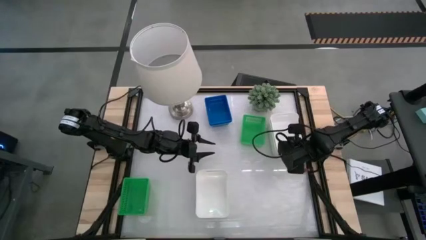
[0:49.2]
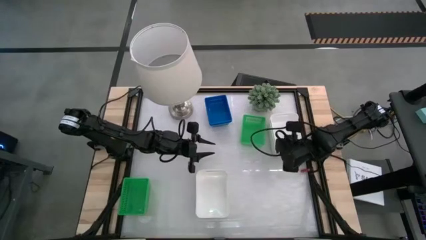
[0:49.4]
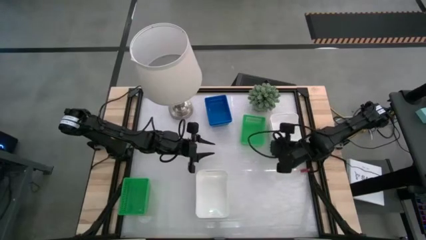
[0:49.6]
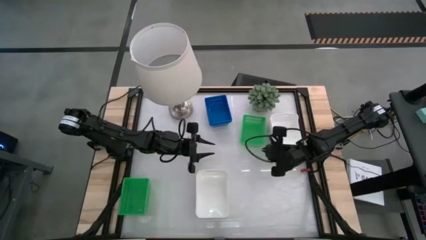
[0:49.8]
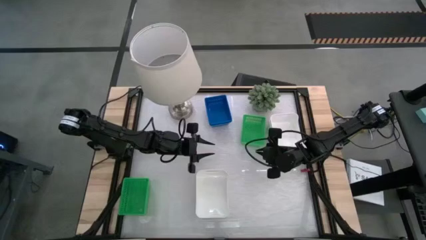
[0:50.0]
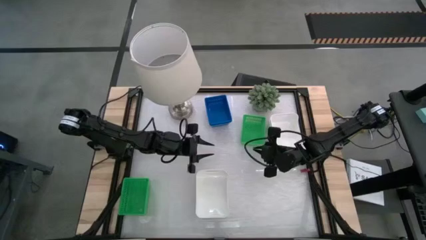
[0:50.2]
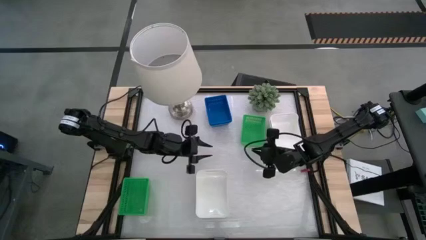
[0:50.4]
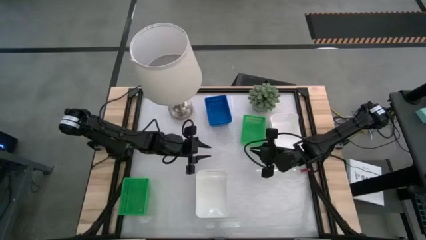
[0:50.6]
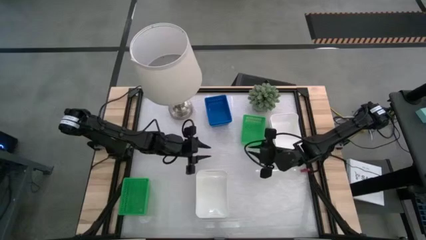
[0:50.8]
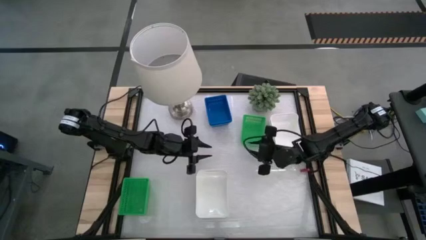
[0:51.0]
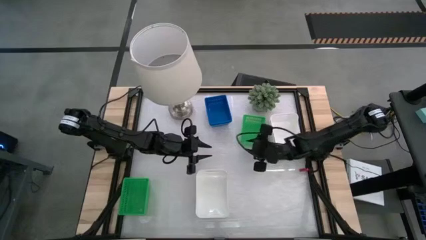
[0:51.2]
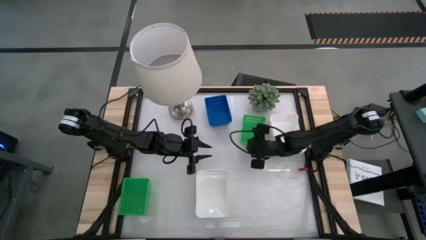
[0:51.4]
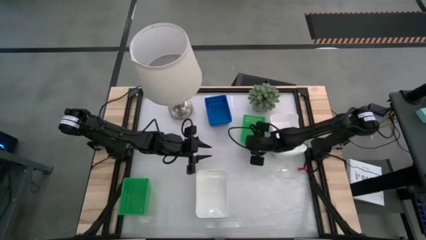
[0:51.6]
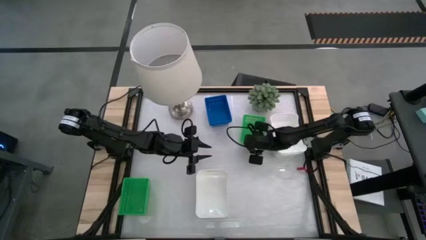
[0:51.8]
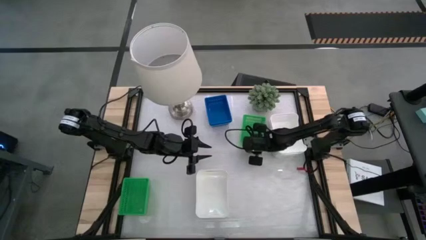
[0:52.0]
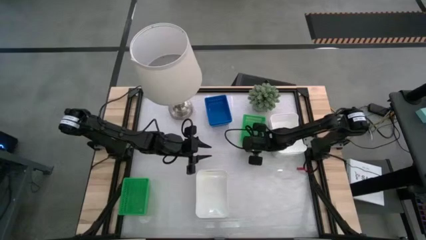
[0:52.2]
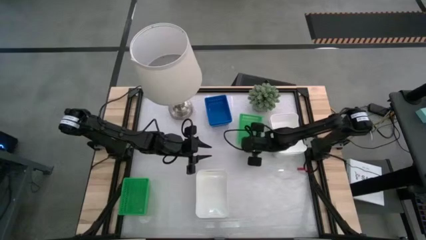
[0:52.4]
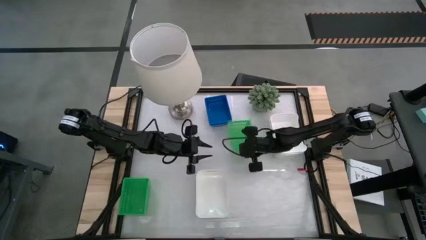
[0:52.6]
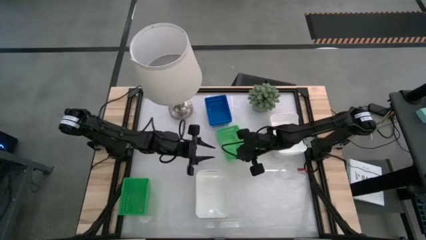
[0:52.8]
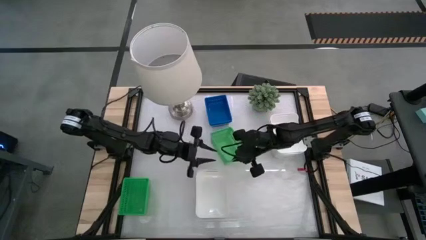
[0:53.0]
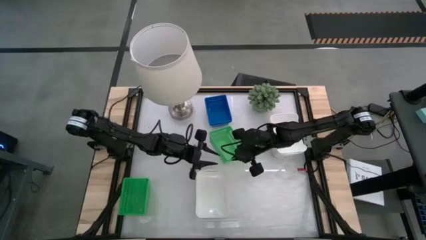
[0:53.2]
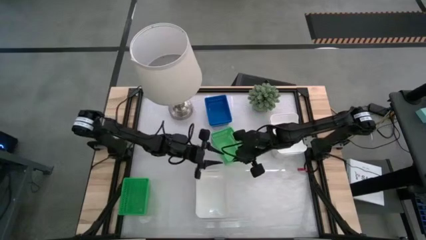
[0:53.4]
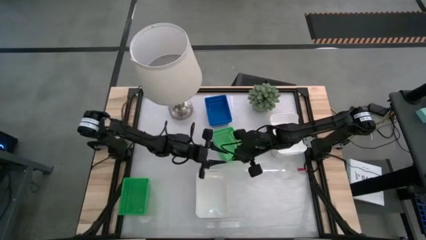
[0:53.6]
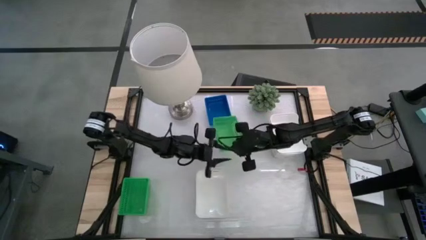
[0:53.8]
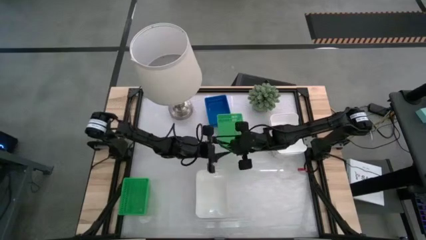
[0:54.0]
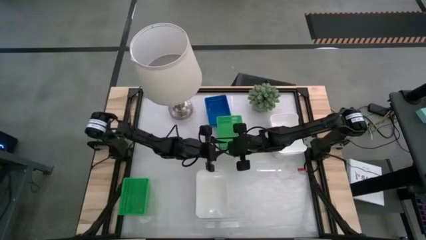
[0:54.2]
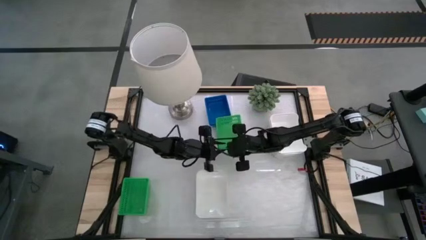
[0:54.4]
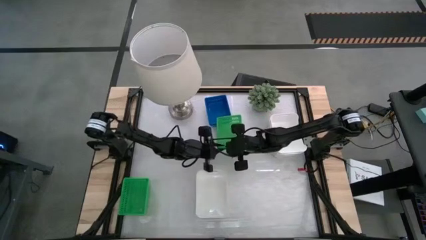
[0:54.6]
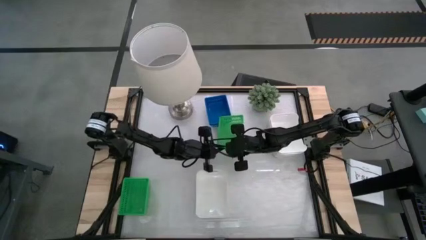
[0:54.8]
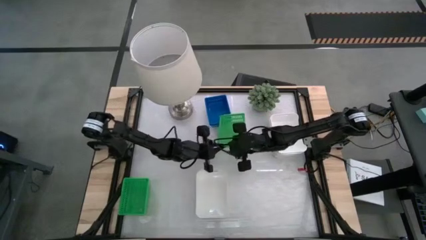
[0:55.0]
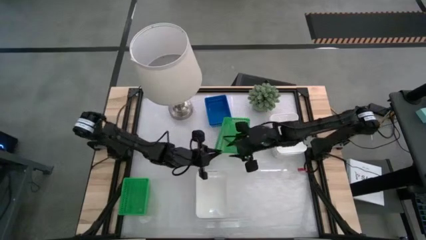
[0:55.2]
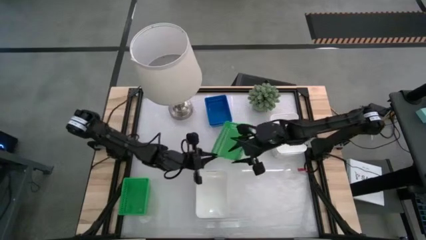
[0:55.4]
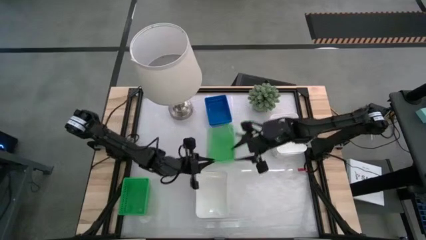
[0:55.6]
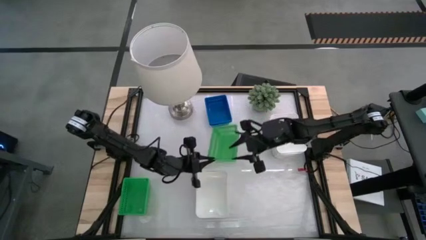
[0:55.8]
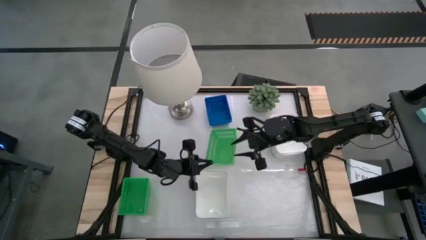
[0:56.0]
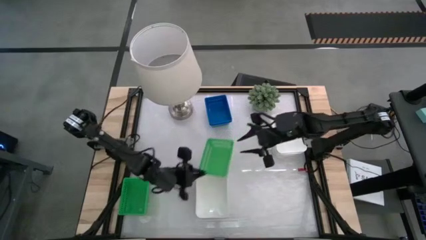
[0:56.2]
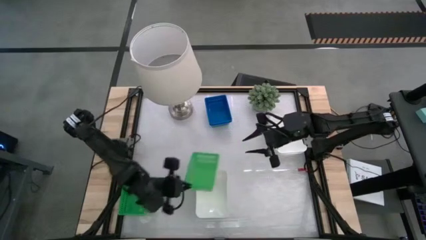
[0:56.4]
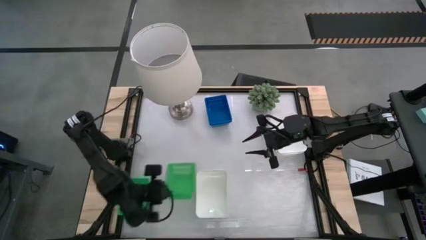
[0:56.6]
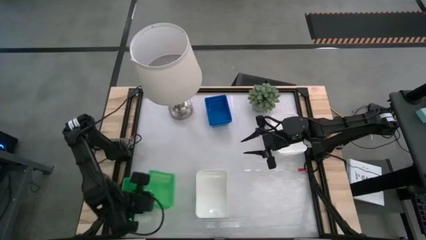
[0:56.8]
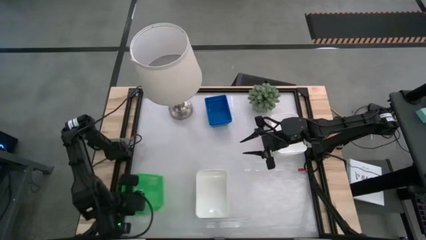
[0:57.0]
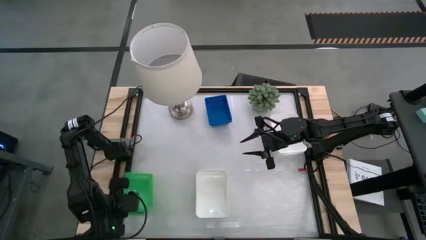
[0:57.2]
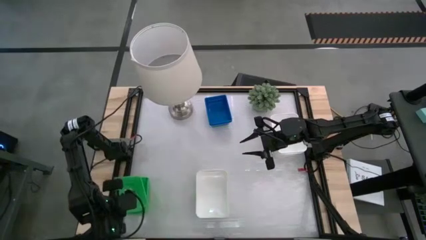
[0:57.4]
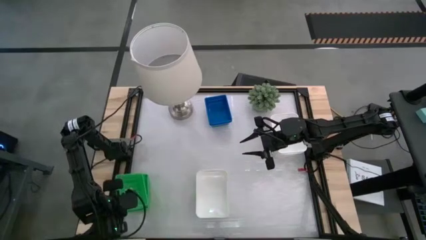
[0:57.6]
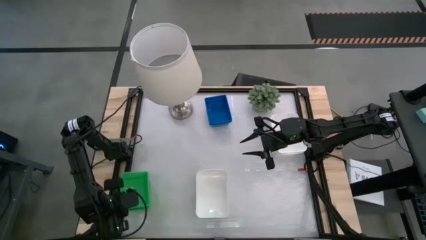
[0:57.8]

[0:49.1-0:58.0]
Stack the top green bin on the stacked green bins

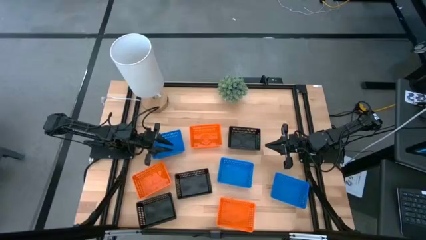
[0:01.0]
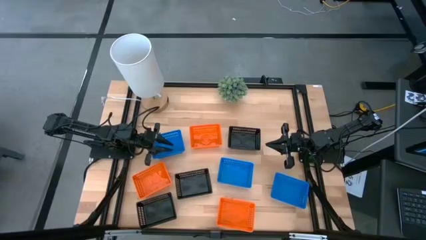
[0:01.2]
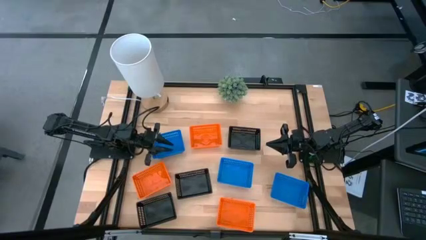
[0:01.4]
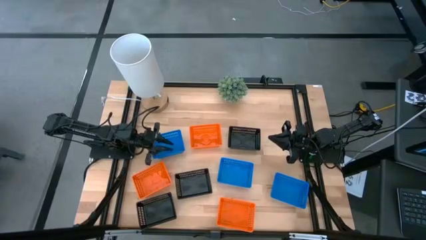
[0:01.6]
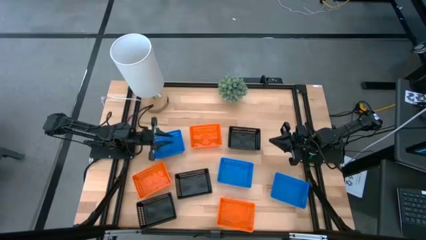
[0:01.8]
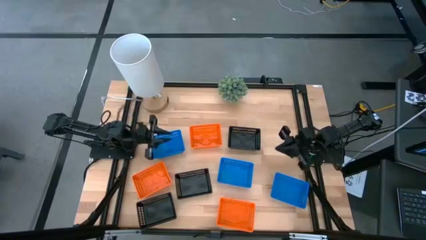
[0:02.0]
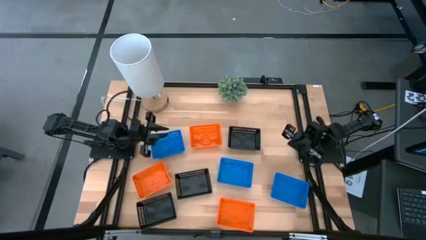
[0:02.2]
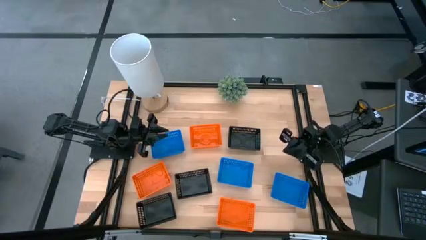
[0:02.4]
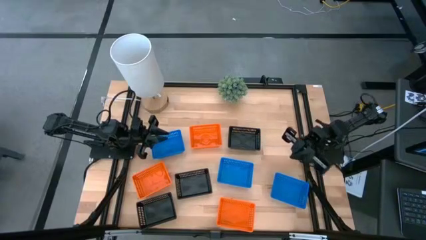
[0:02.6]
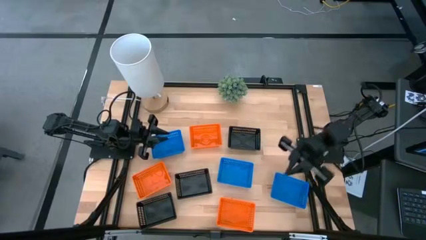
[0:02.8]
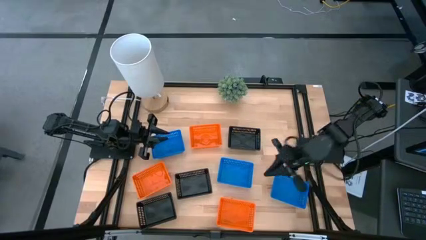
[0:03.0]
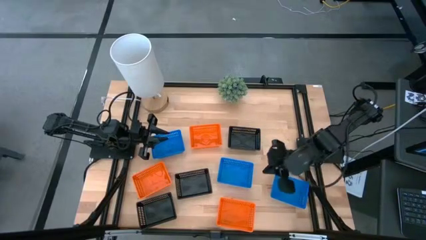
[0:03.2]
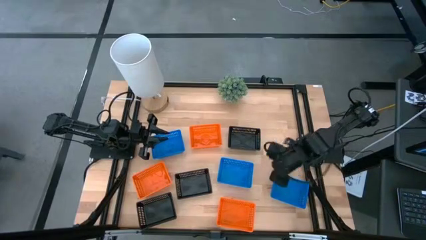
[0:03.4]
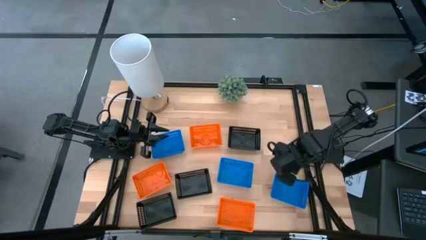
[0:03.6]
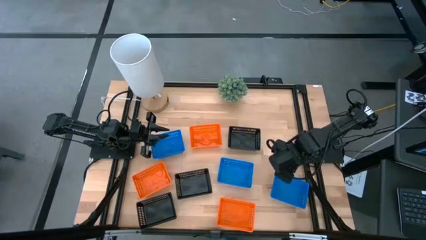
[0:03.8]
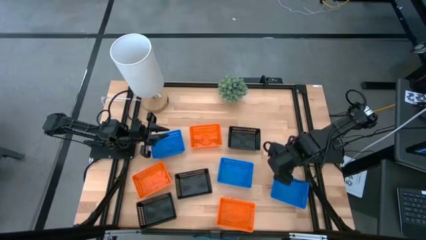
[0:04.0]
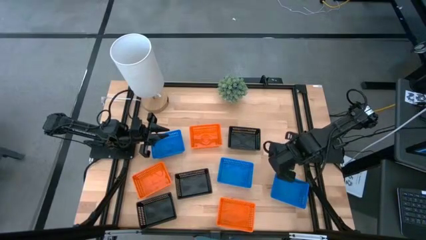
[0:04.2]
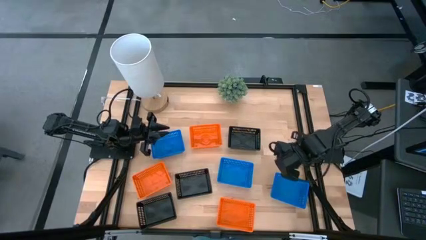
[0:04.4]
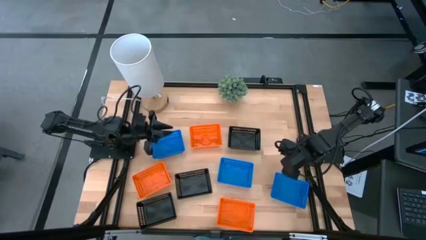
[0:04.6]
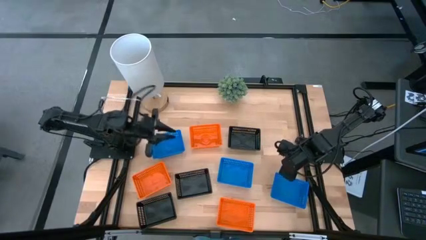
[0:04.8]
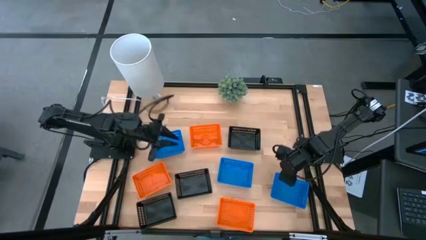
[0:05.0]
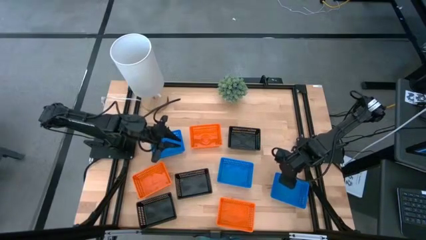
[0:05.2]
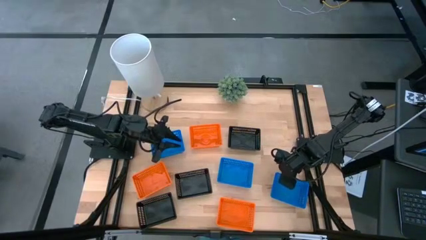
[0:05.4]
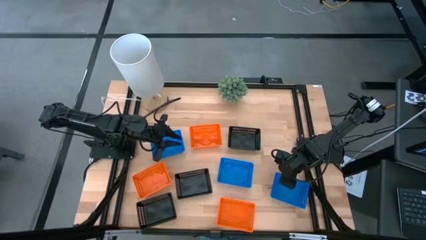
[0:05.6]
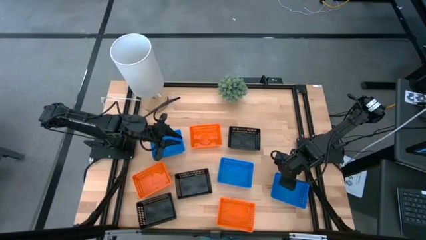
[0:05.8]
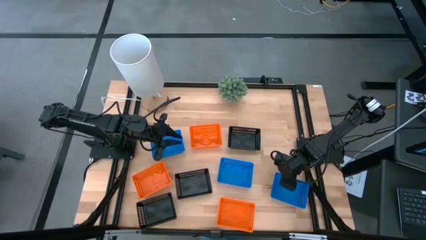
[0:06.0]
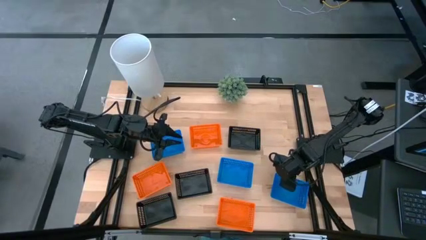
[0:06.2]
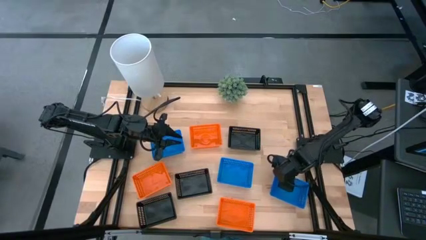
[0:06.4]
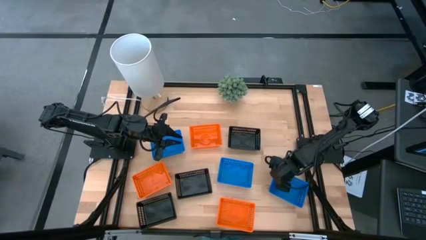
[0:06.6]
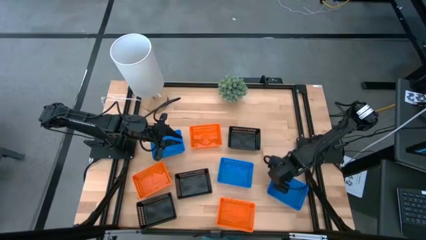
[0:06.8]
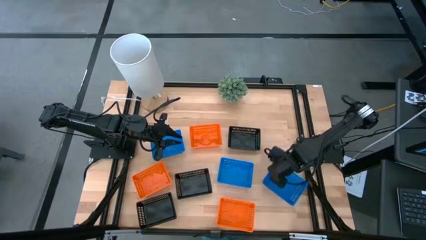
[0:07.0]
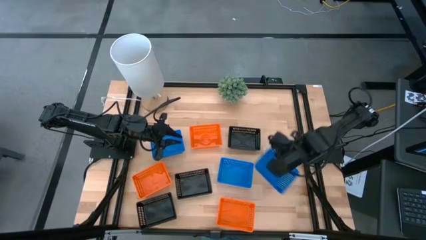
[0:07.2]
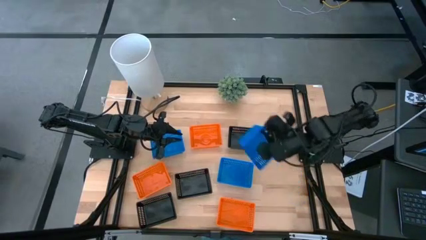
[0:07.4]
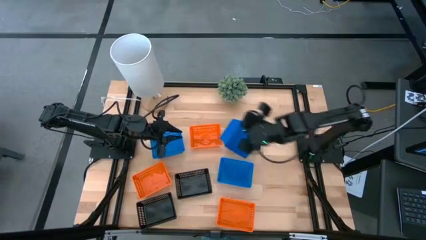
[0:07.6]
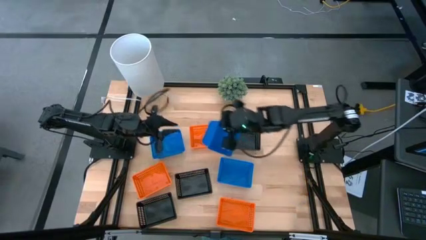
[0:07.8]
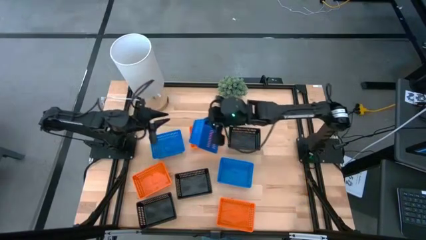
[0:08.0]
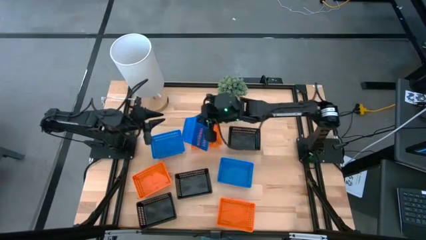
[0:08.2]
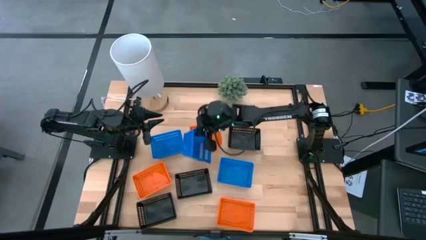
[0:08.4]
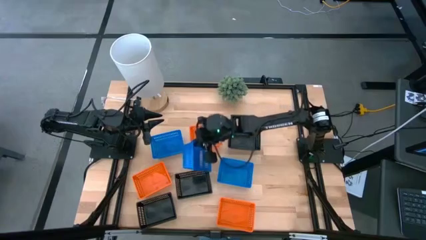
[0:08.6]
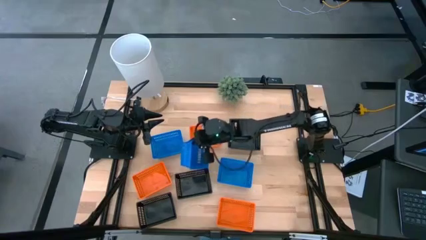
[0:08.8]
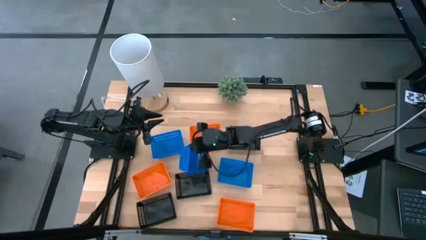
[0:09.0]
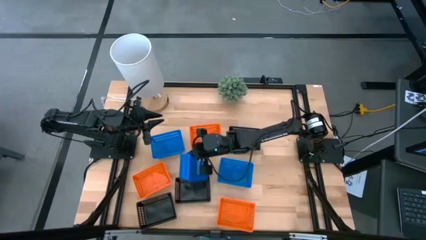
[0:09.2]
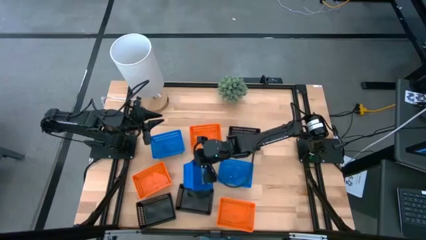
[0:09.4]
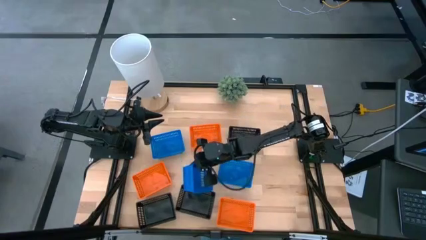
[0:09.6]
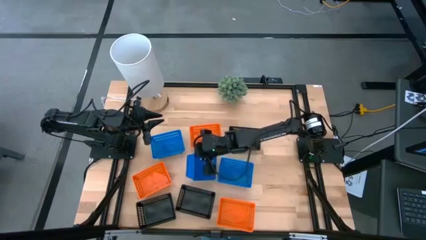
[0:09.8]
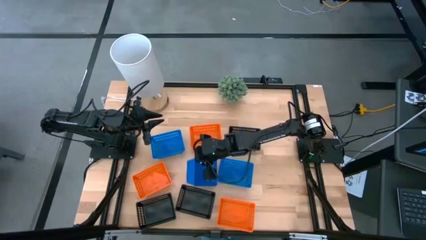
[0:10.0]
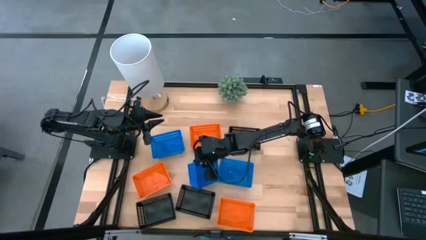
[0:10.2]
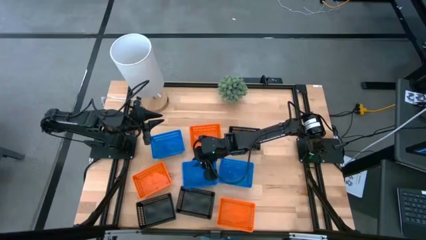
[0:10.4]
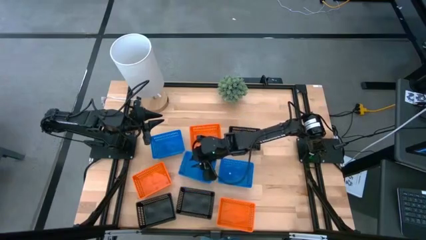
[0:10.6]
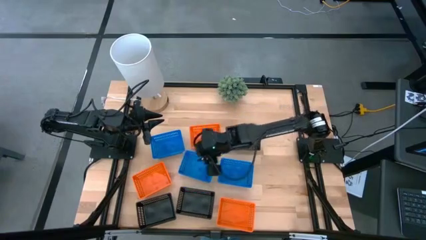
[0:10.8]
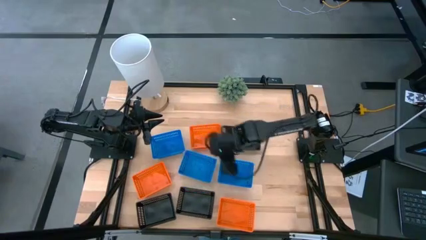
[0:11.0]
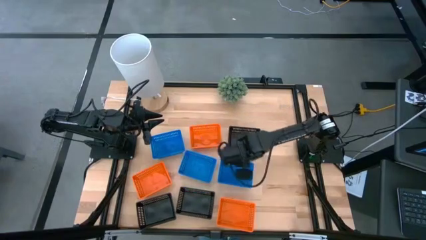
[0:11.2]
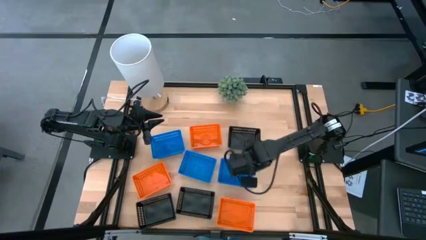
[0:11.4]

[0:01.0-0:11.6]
Move the bottom right blue bin to the center of the table
